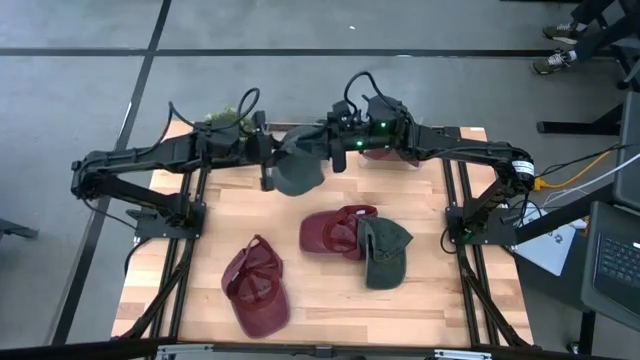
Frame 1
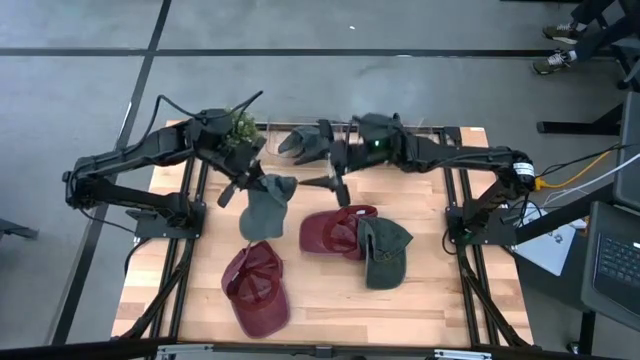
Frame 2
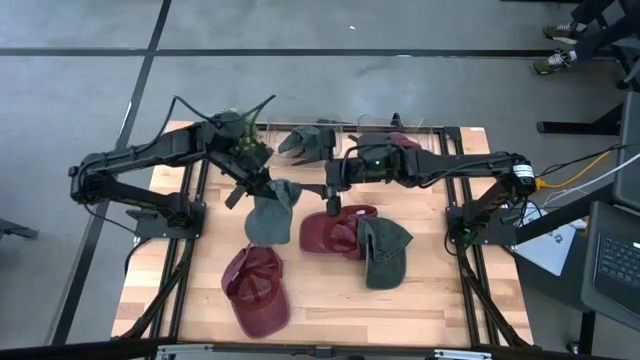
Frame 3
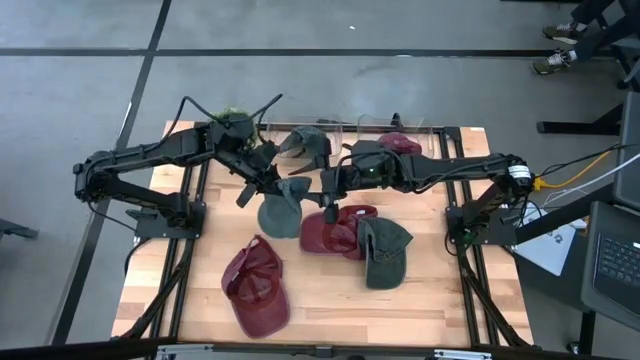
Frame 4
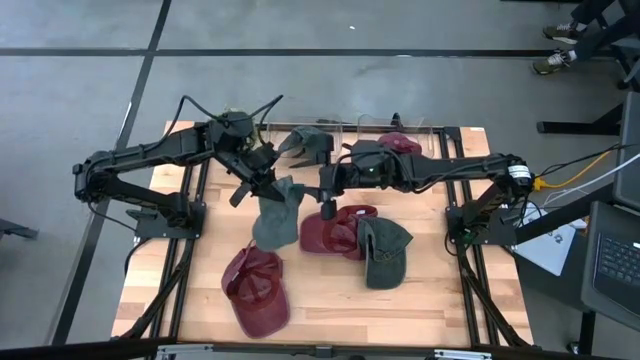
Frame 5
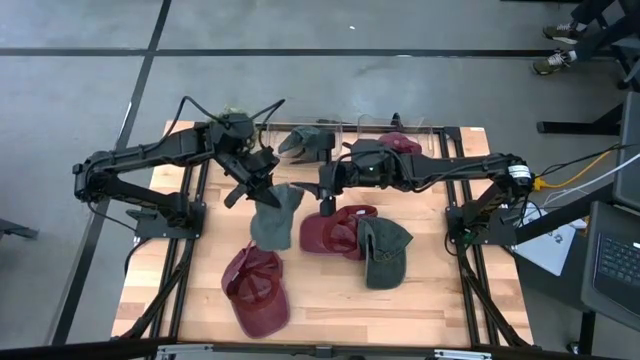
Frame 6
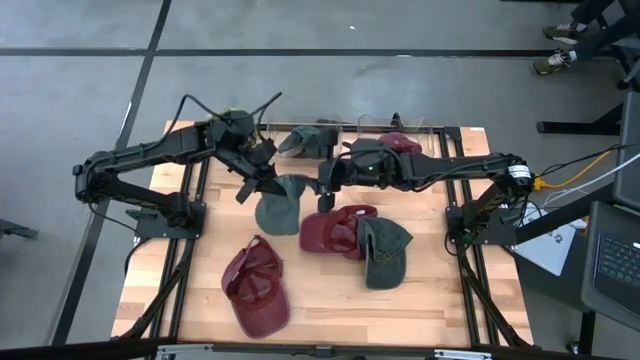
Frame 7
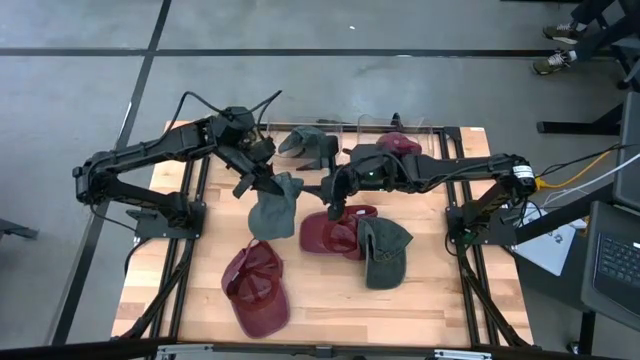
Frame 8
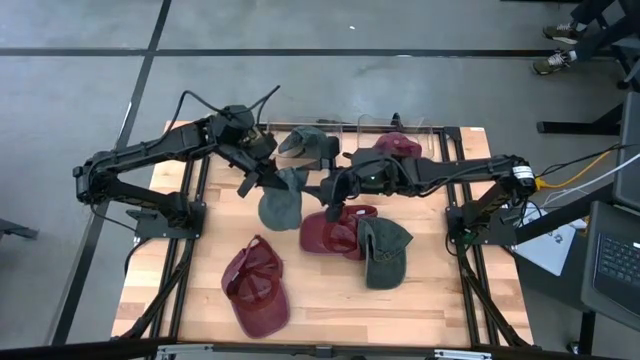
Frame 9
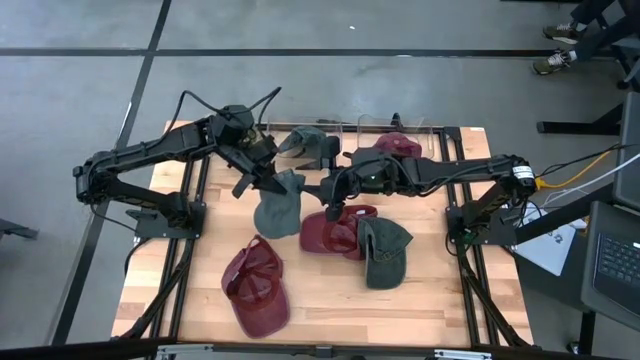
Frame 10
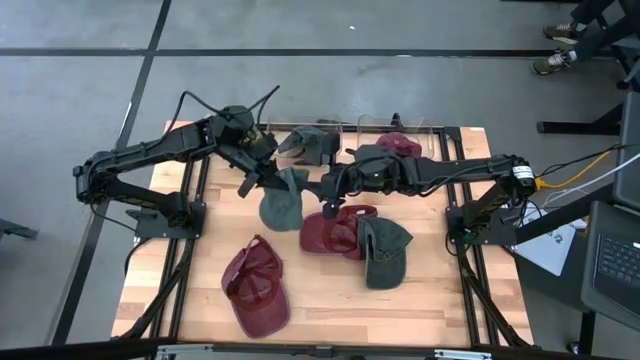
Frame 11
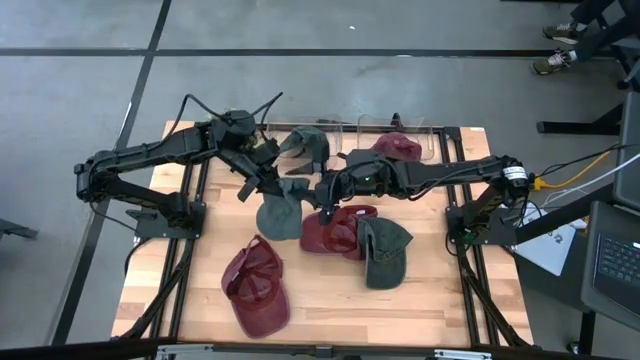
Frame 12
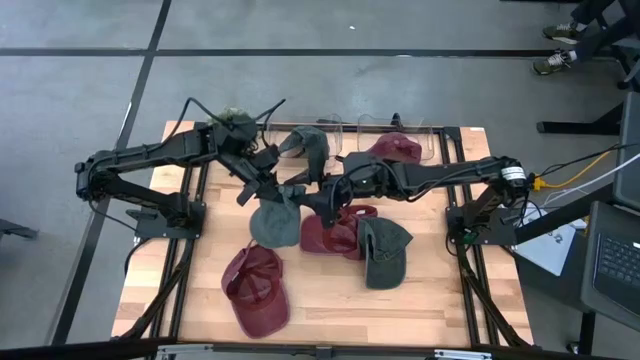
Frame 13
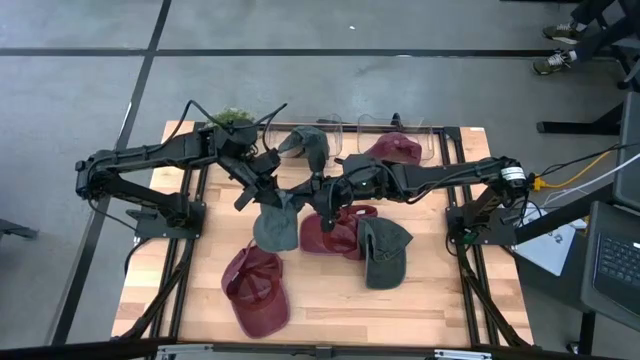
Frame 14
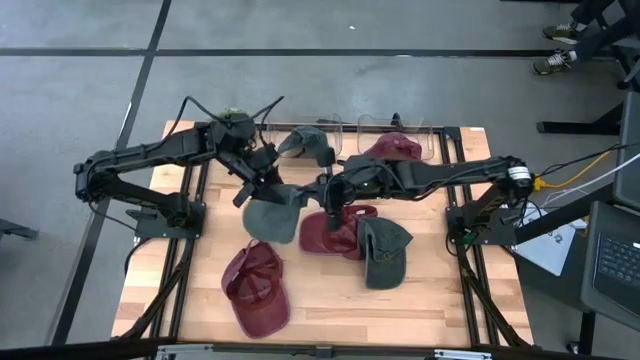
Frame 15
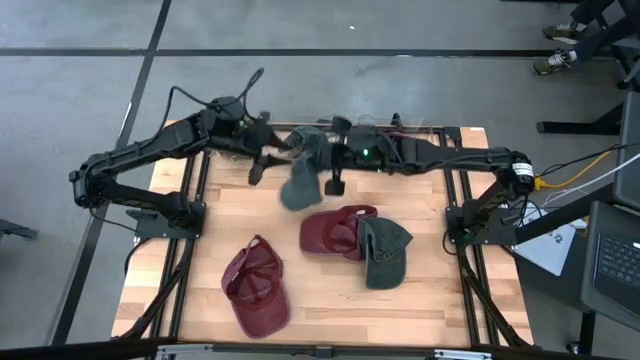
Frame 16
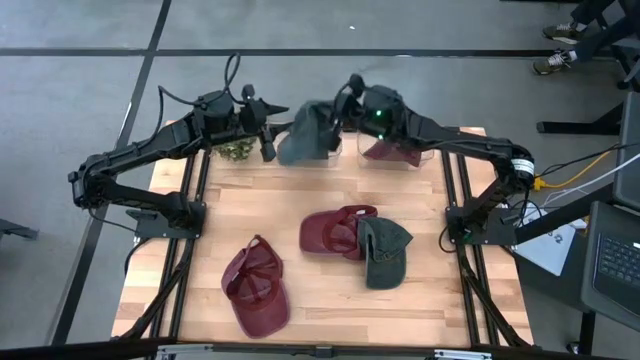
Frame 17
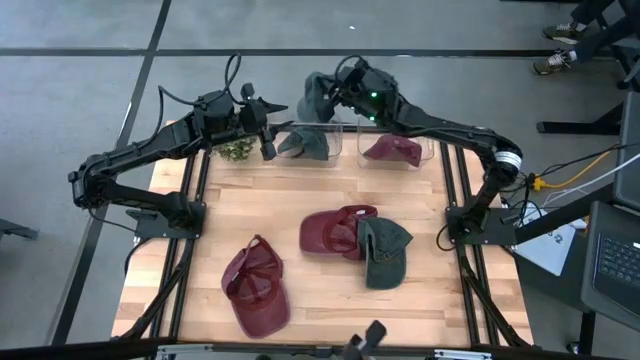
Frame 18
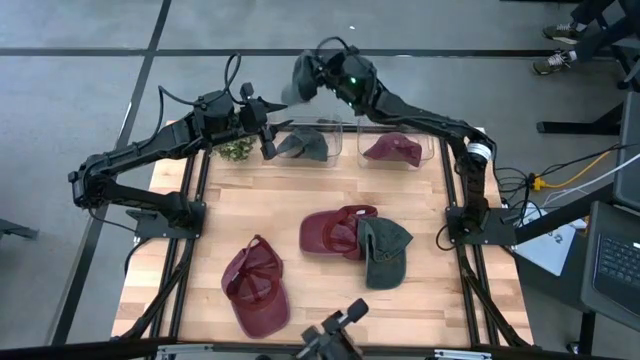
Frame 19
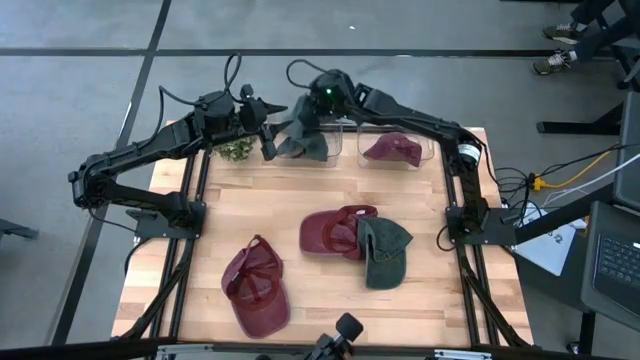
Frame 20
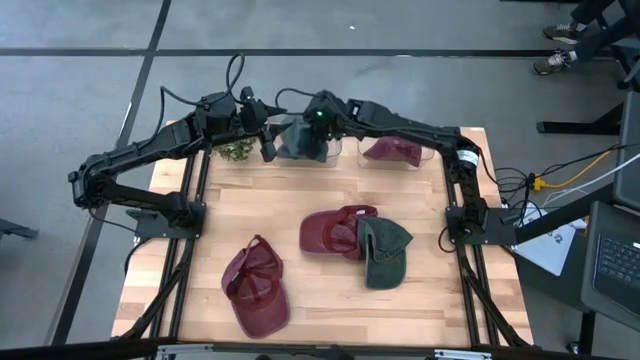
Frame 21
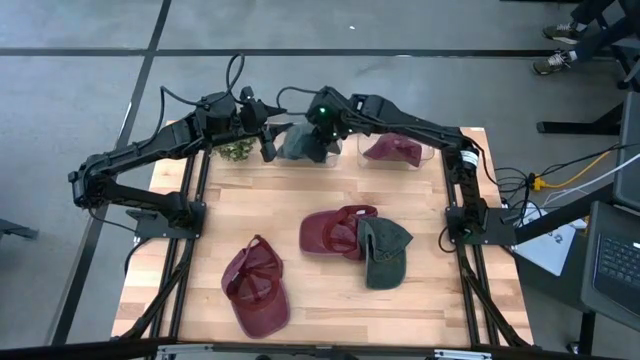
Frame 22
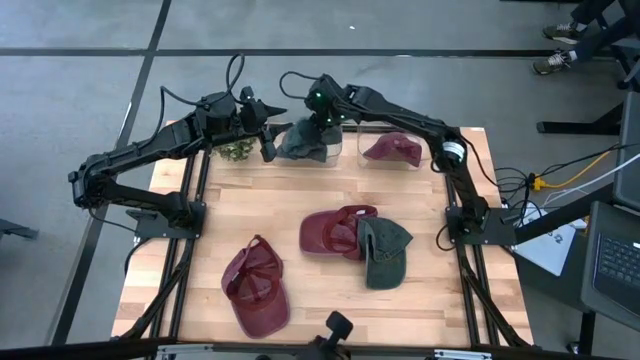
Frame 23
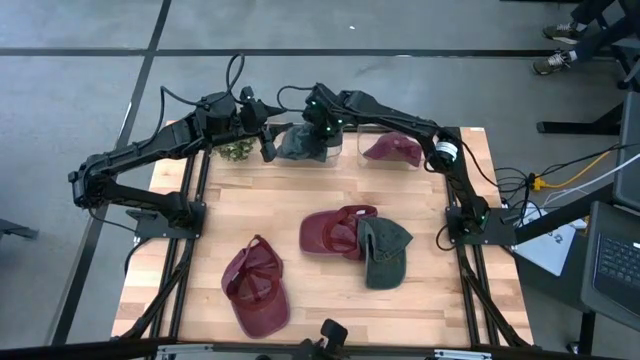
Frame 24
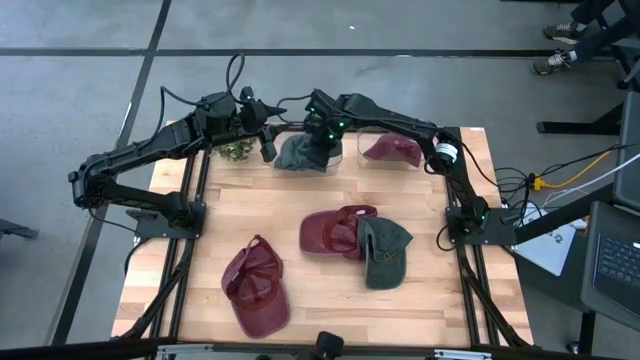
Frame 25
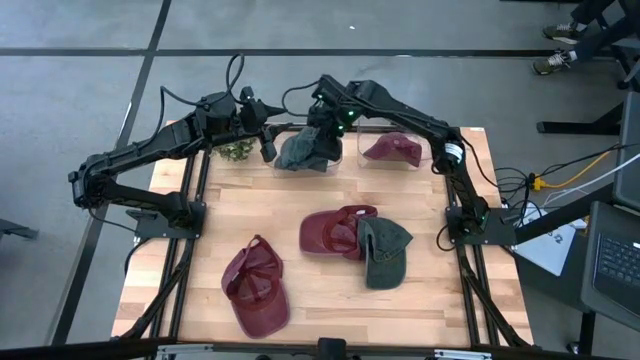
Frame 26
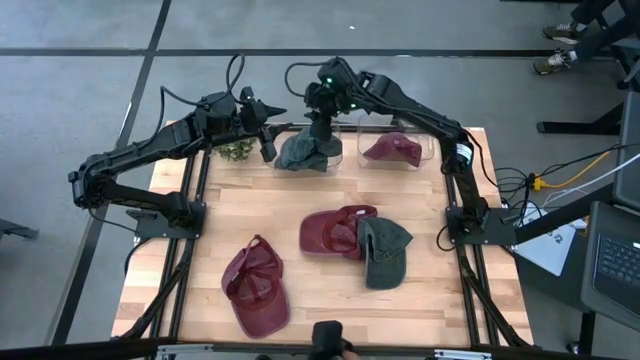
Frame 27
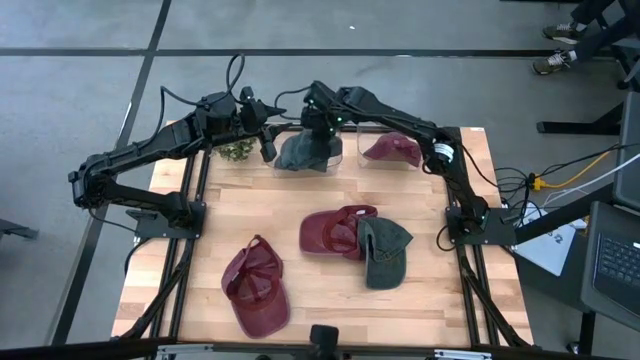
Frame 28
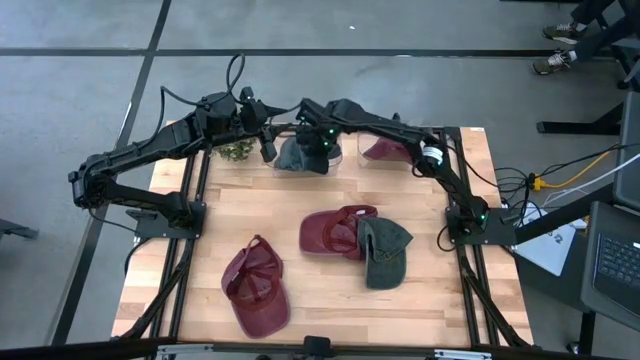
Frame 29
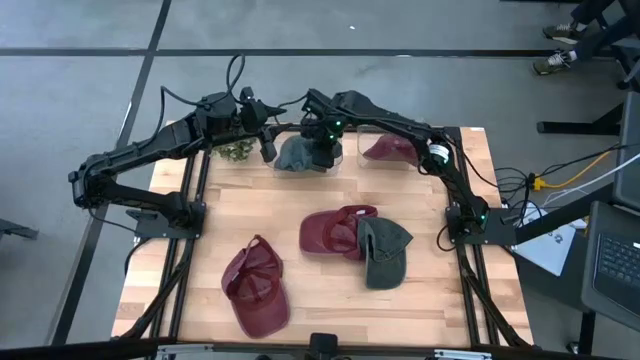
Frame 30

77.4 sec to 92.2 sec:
Task: Pick & Place hat
Put the top gray cap on the gray cap into the left transparent bin

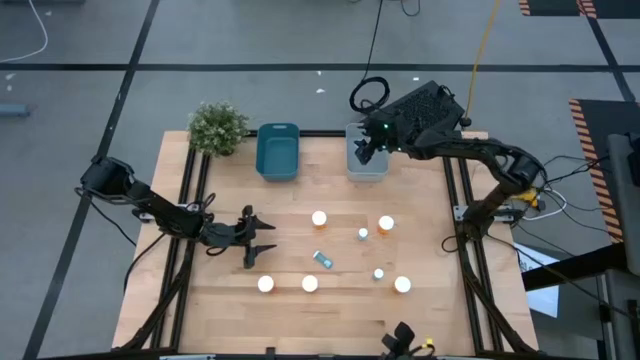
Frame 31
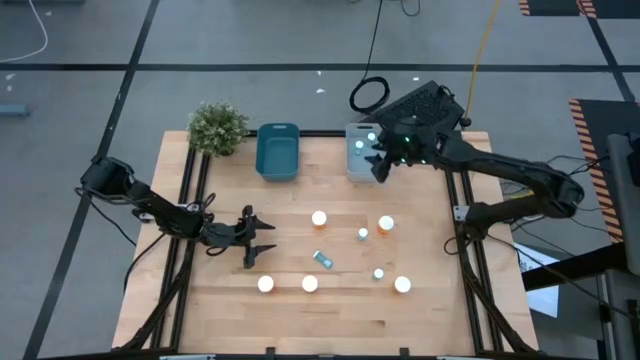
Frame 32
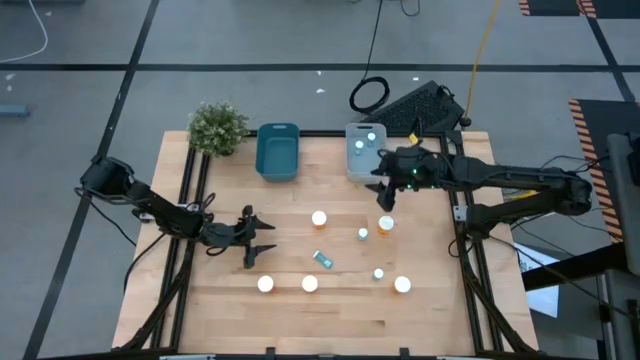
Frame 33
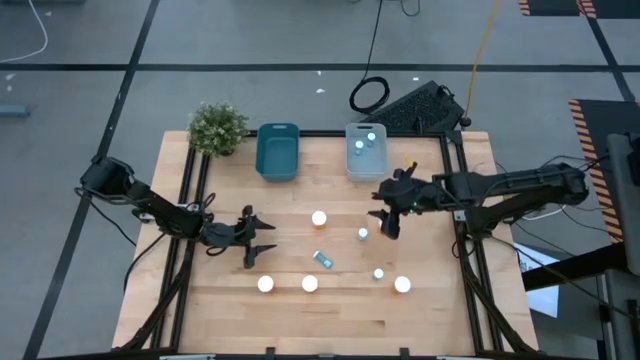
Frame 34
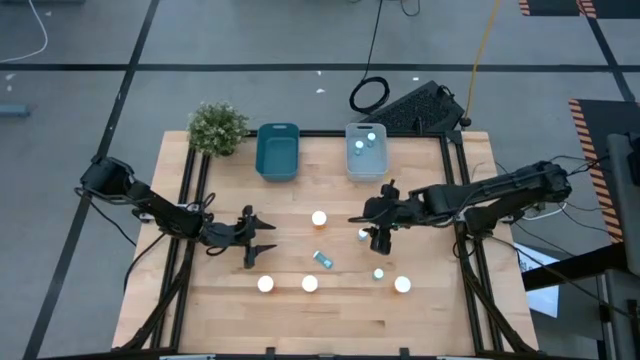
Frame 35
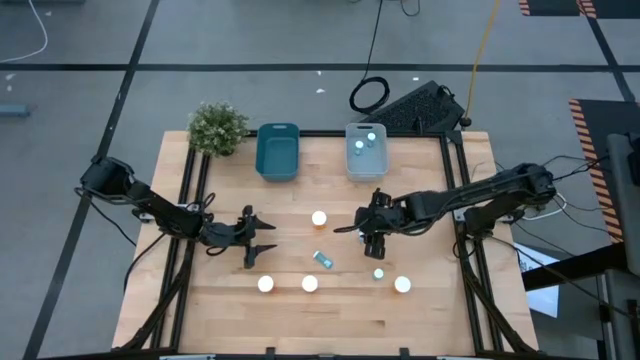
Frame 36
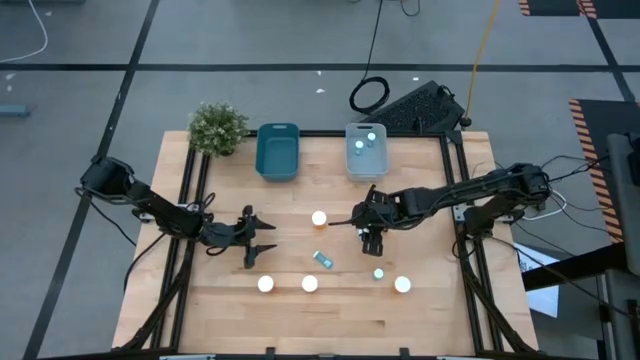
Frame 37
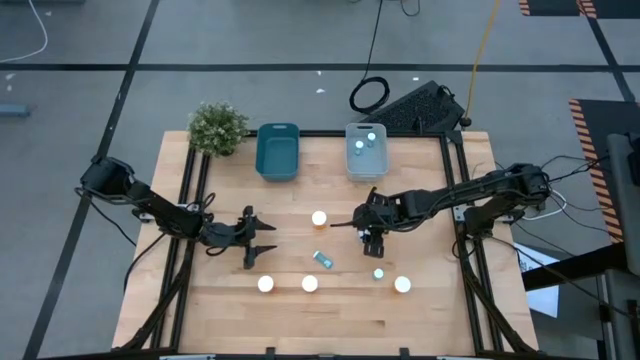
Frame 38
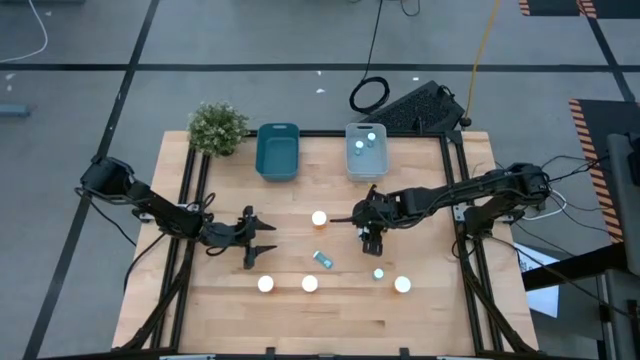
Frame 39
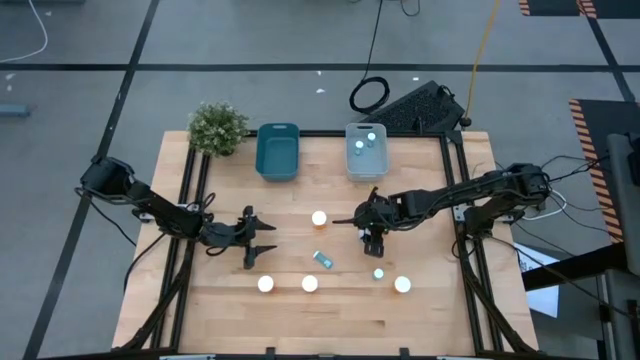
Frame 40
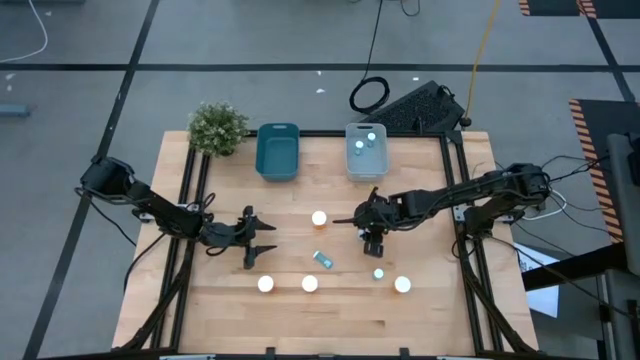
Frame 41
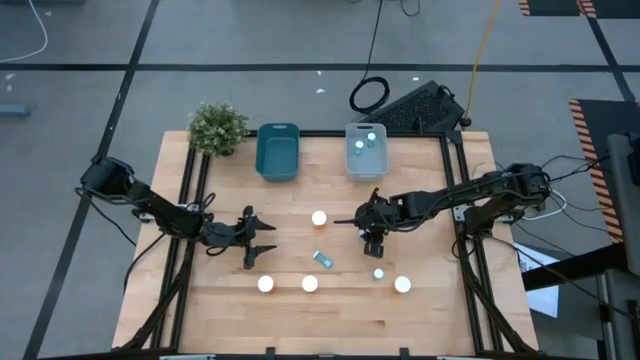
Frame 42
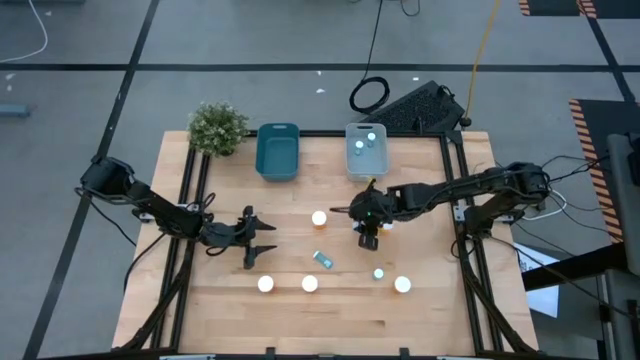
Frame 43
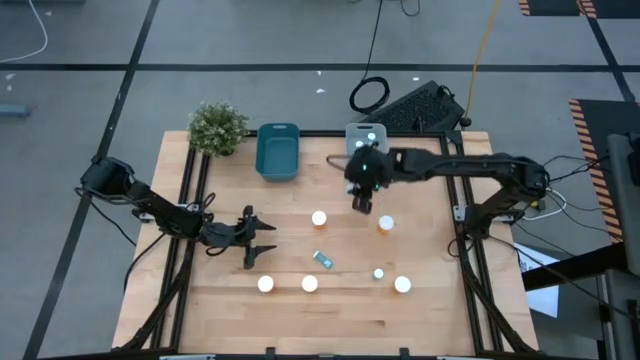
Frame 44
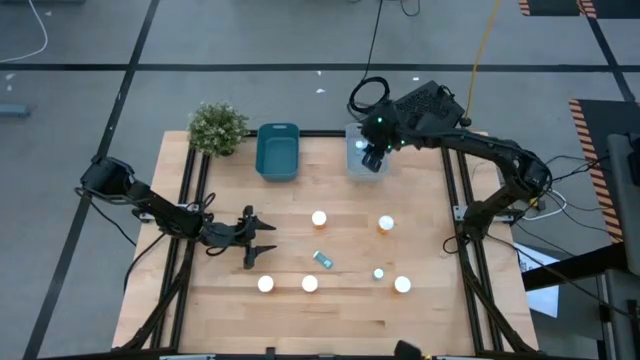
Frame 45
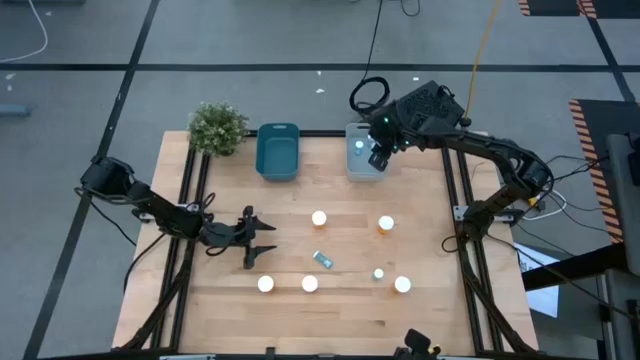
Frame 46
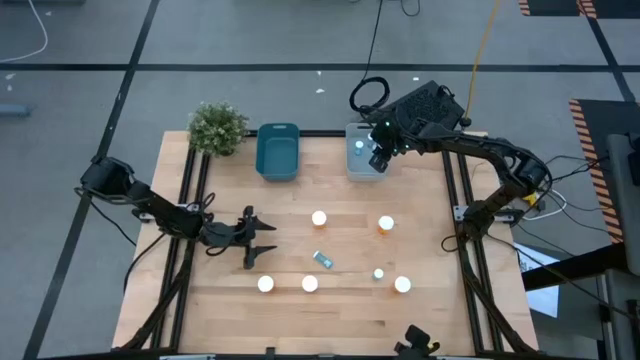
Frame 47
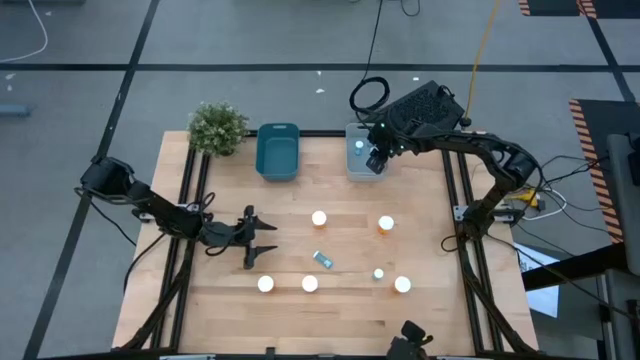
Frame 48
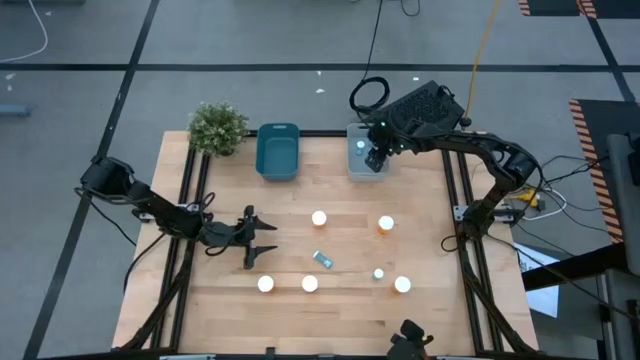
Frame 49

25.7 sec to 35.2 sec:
Task: Pick and place medicine bottles into bin by pill shape (circle, oval)
Put the blue pill bottle into the gray bin
